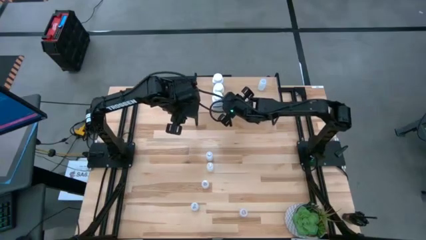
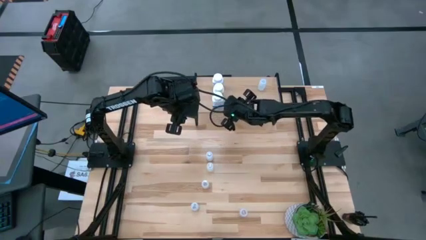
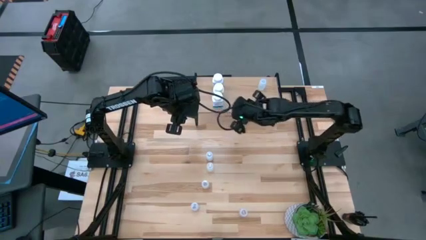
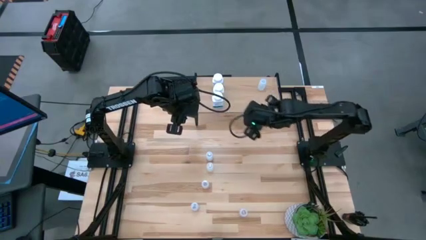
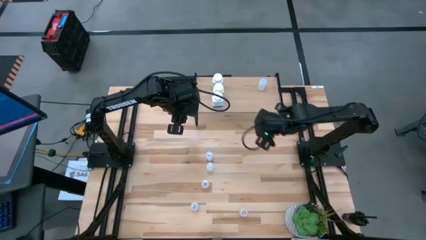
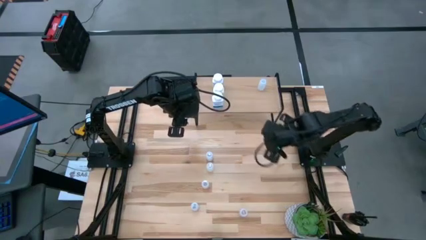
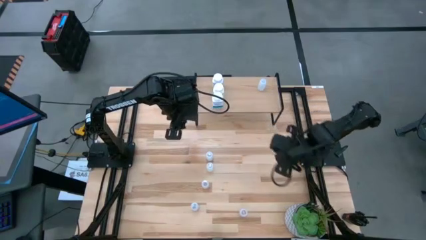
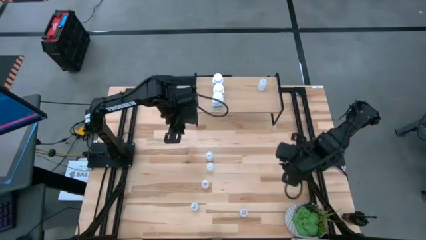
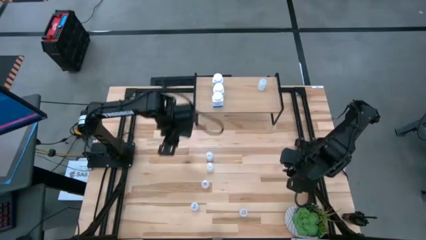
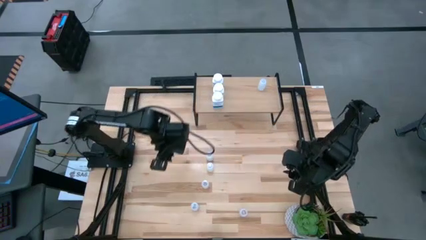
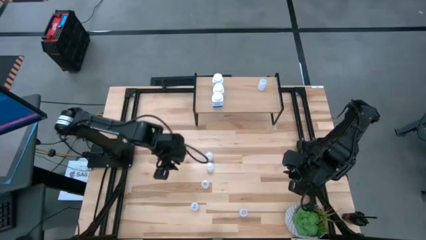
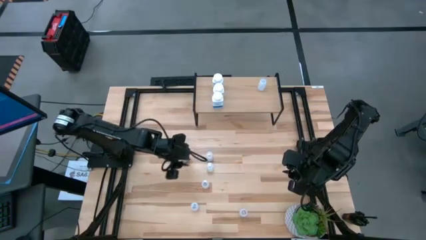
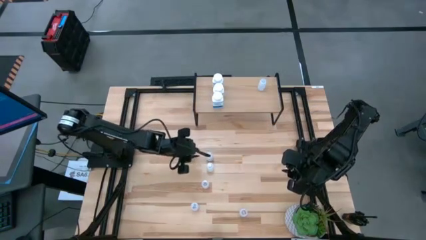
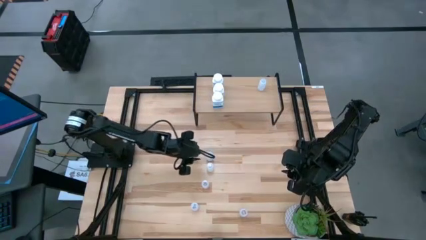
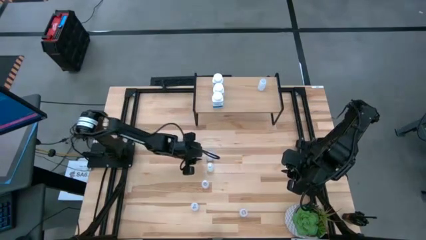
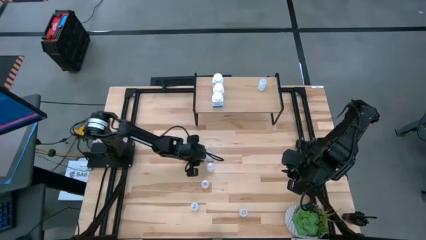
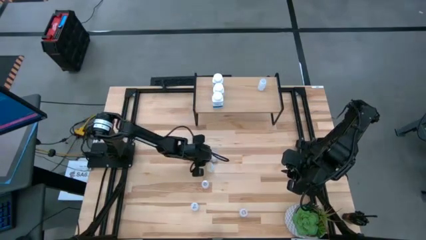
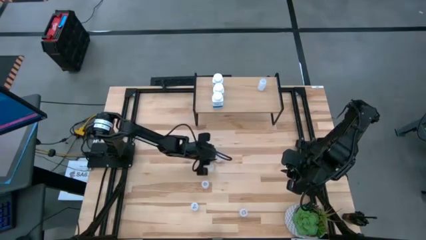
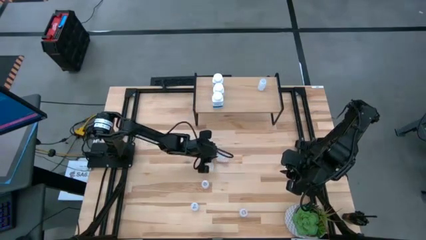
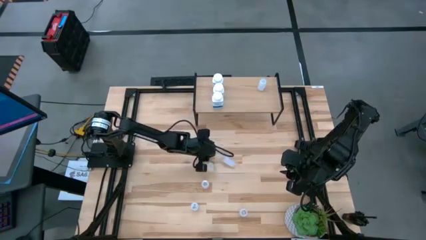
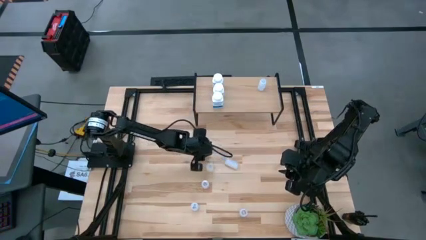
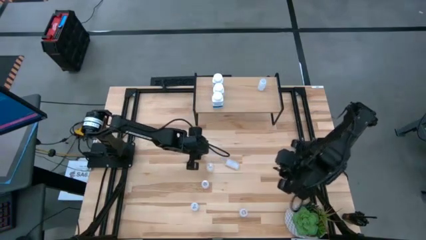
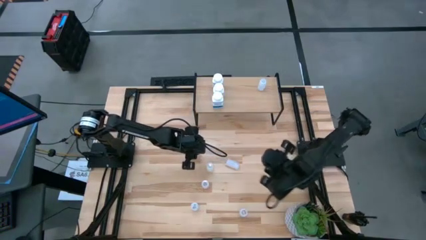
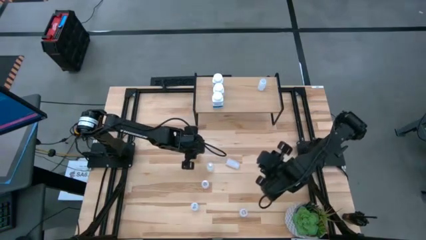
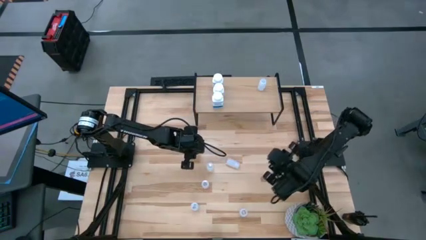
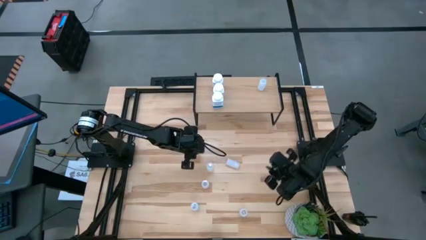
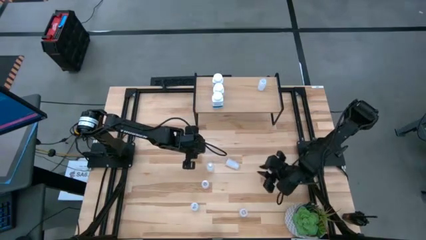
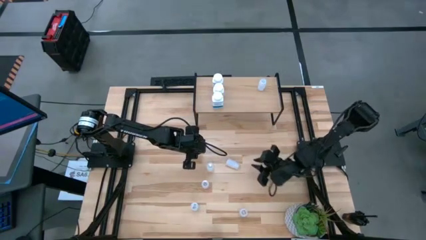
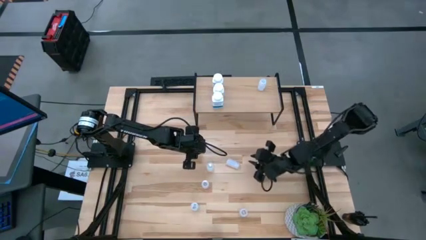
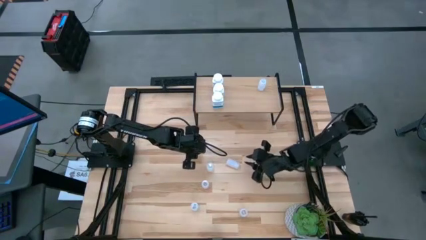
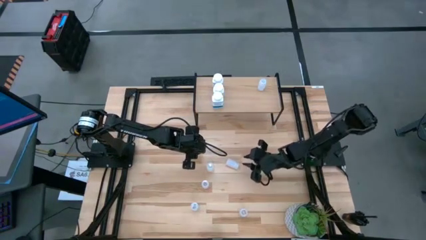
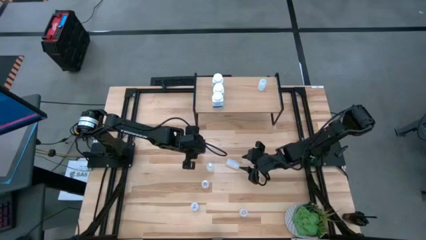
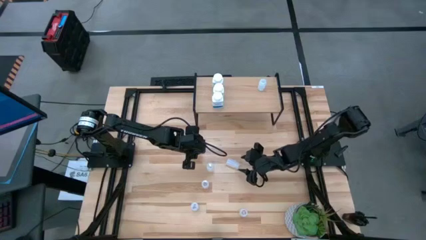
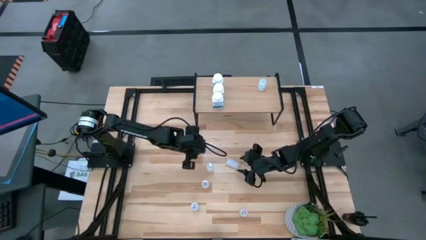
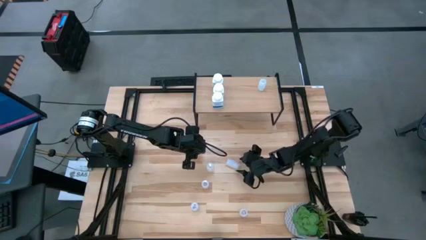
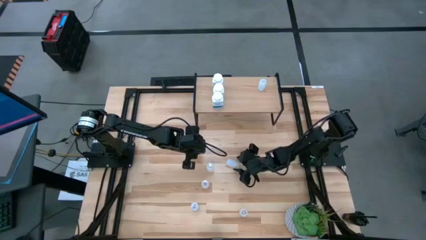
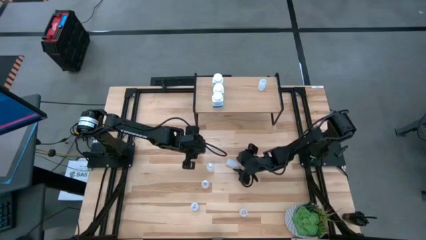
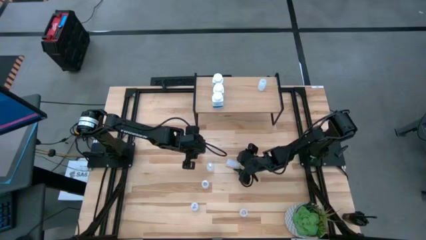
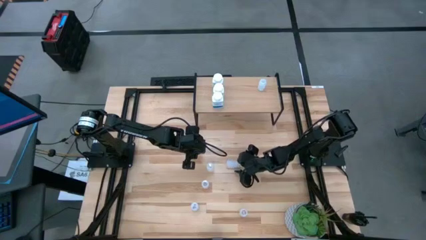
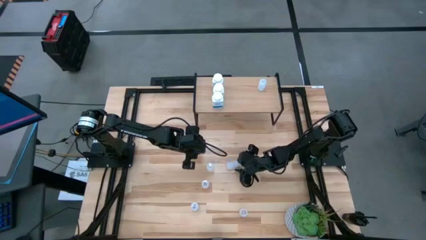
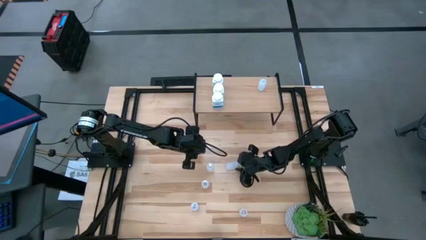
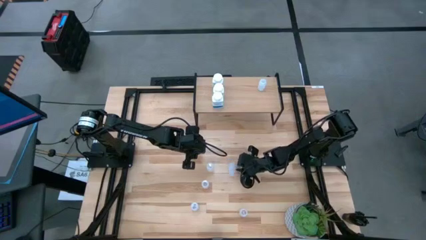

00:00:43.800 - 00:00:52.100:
Task: Pick and place medicine bottles onto shelf by color
Put the top white pill bottle on the shelf

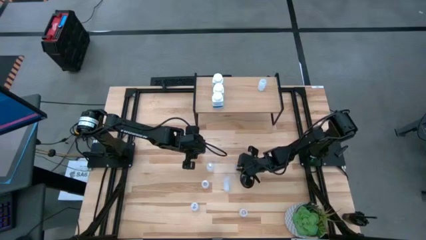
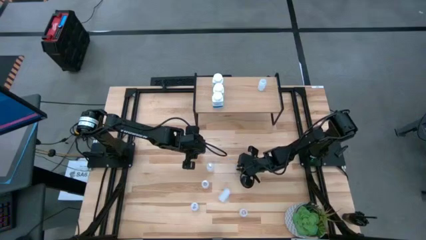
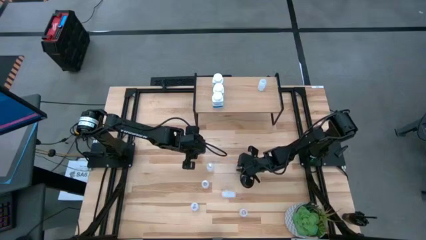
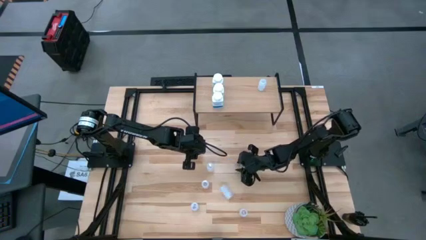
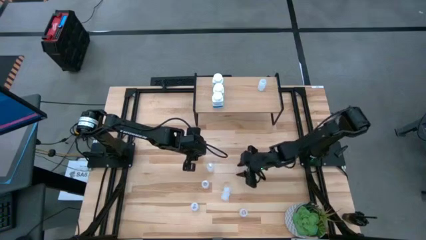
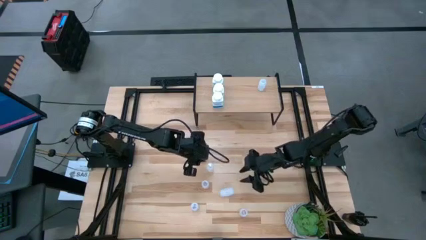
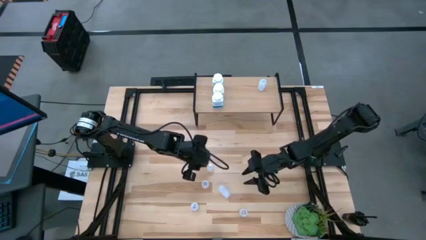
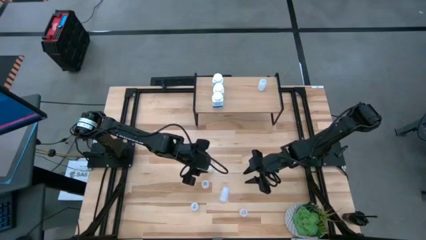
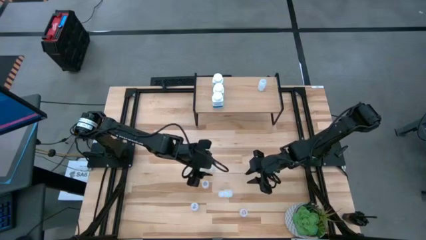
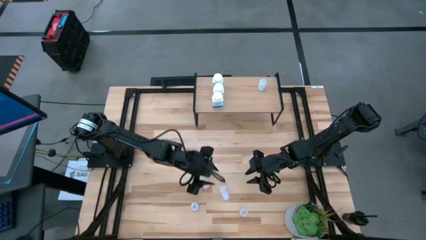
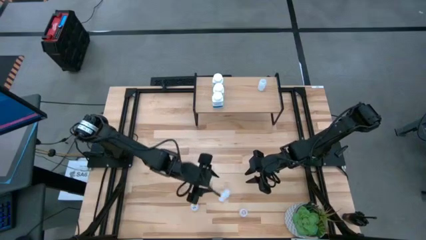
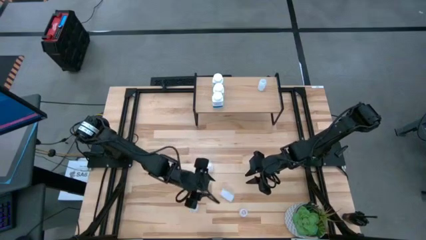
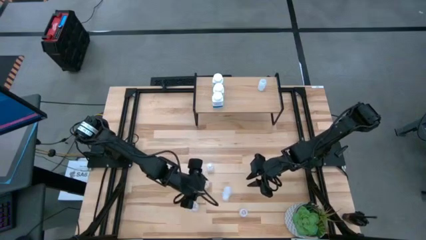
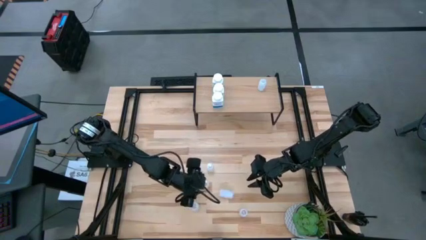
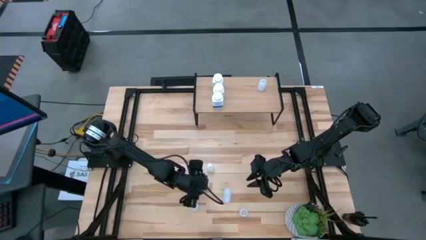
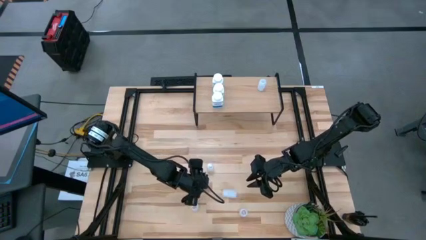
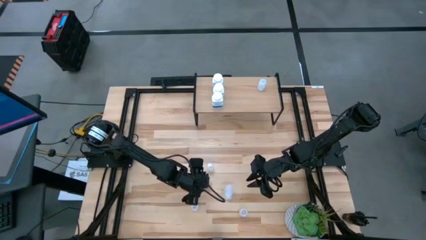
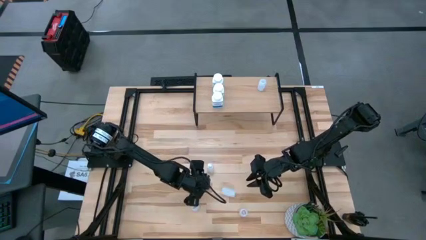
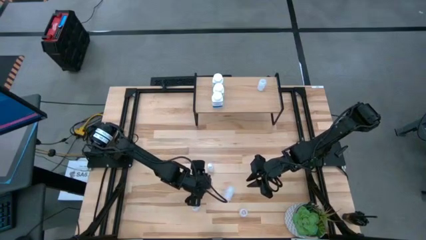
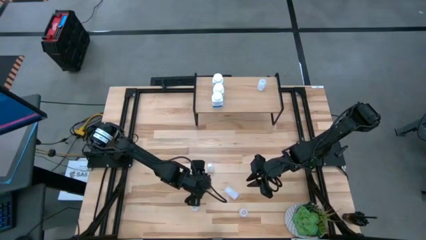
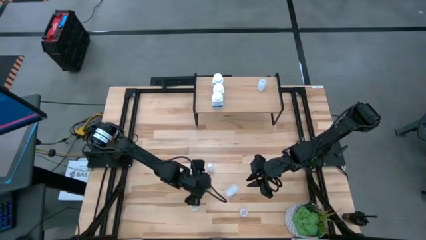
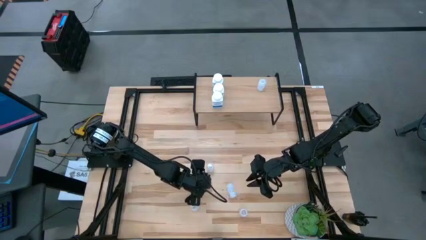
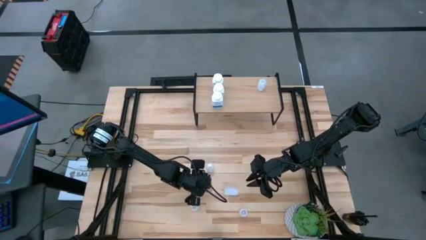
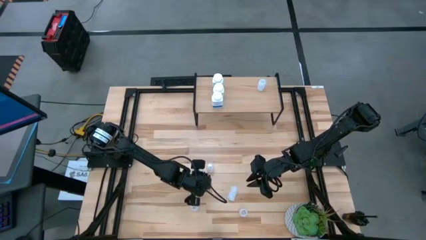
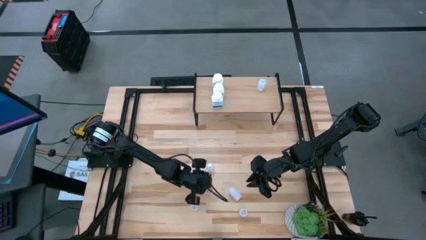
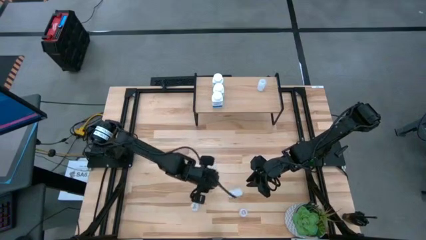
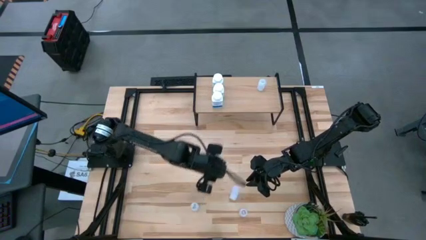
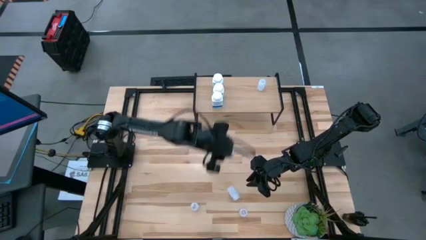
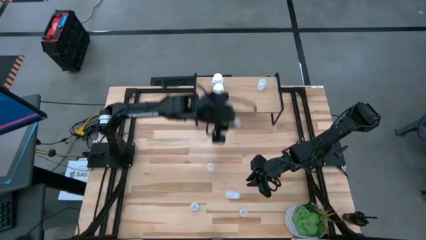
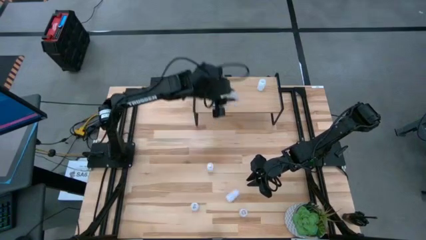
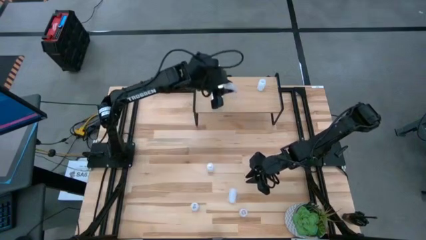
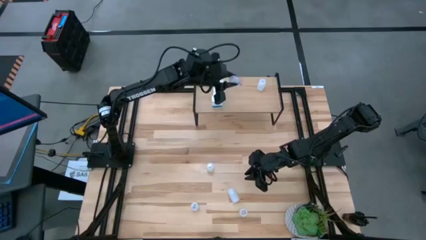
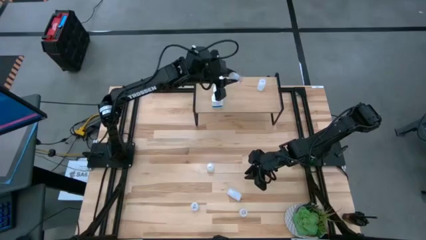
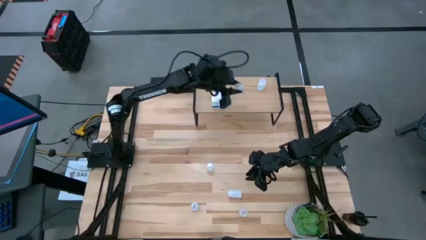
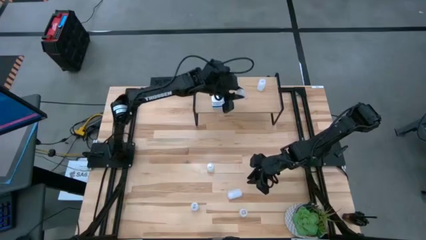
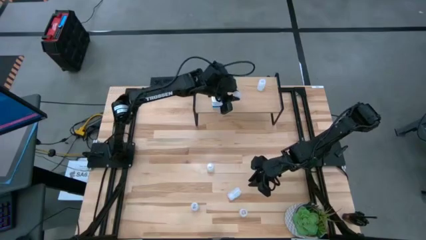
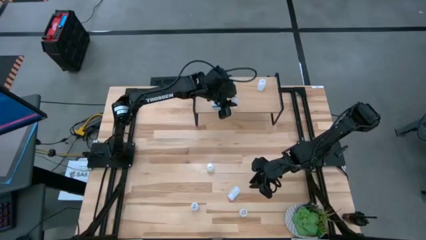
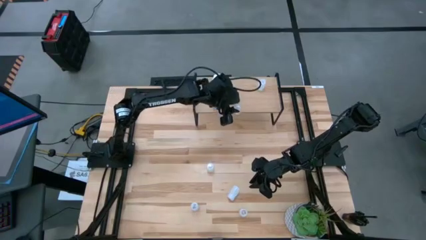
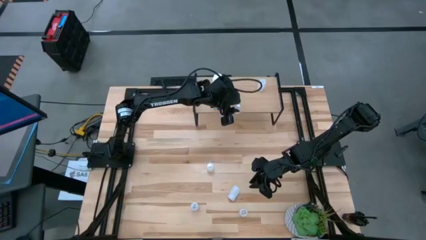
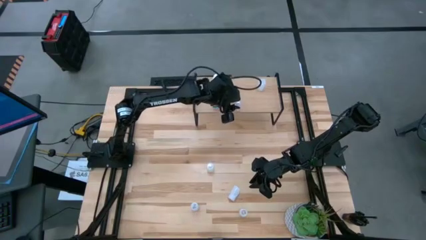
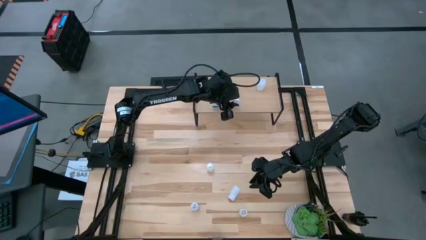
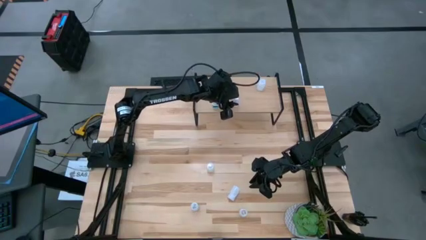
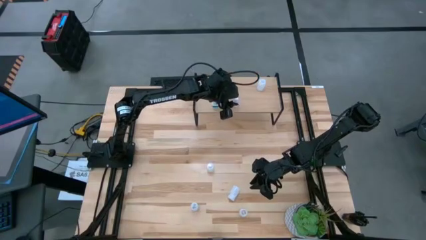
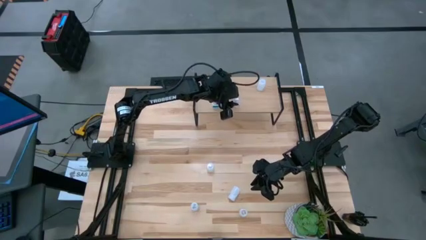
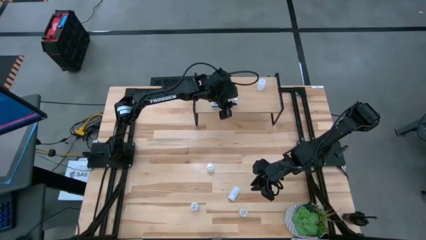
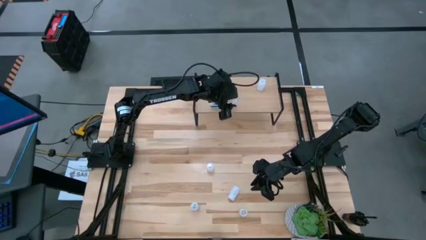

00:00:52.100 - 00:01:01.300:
Put the top left transparent pill bottle on the shelf

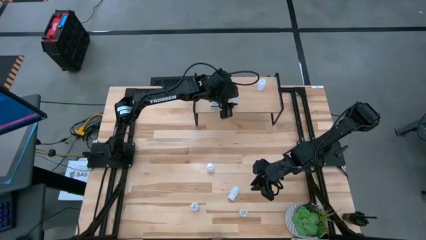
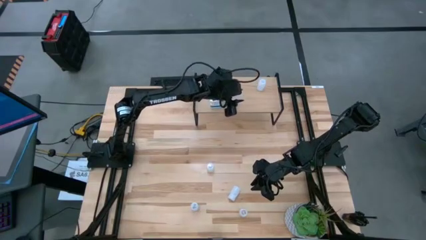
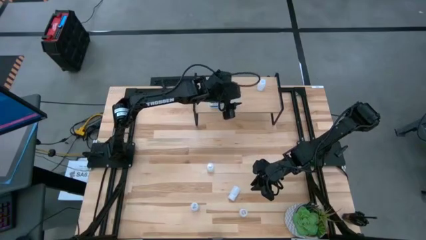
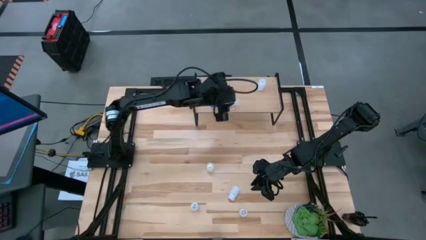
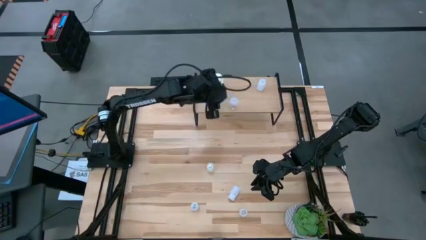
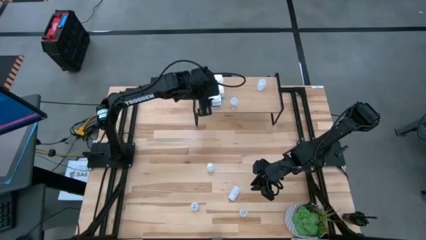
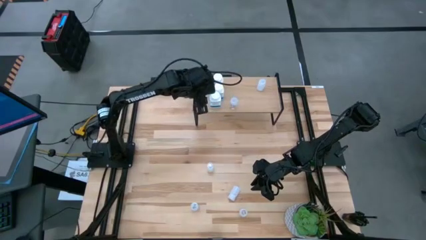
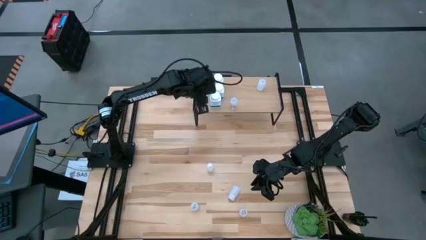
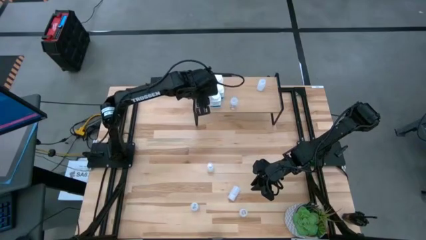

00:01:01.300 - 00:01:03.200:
Adjust the white medicine bottle on the shelf
